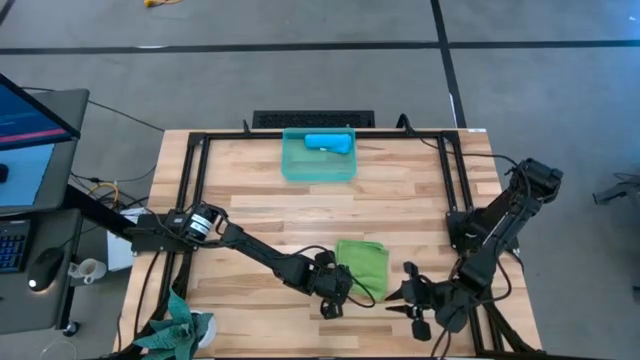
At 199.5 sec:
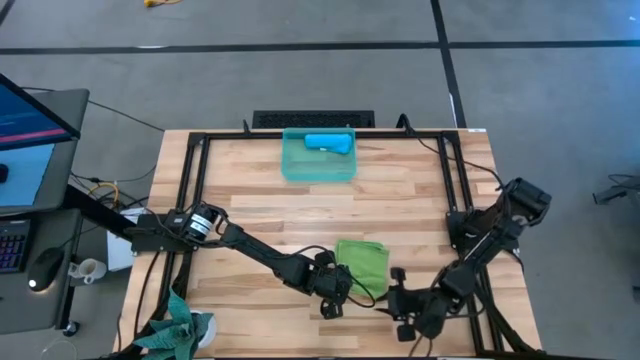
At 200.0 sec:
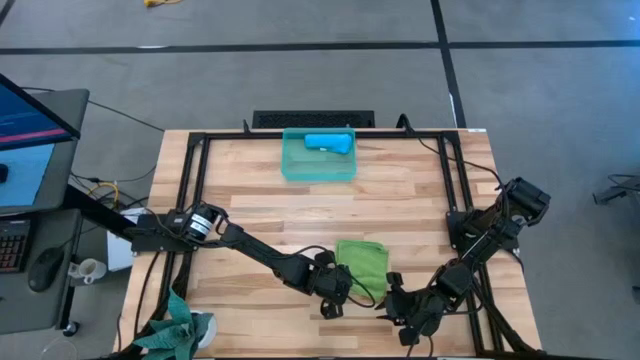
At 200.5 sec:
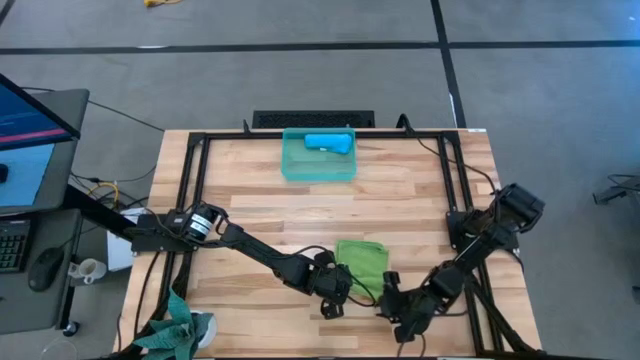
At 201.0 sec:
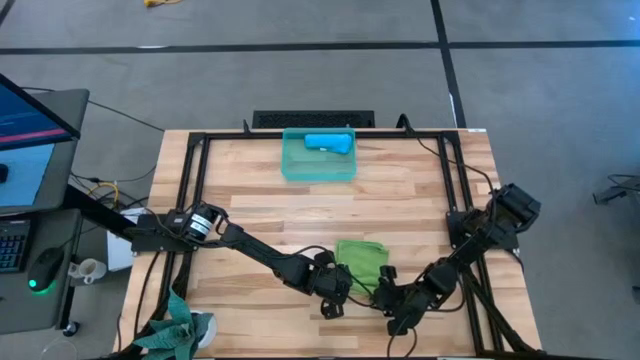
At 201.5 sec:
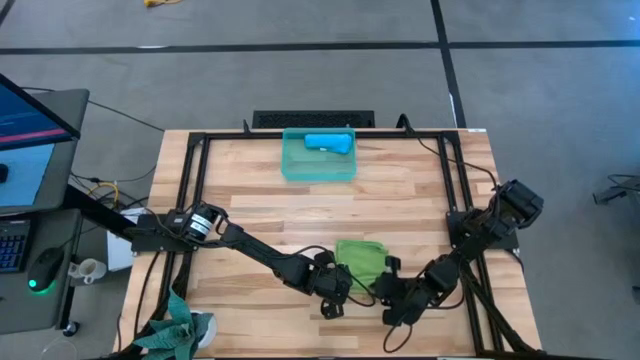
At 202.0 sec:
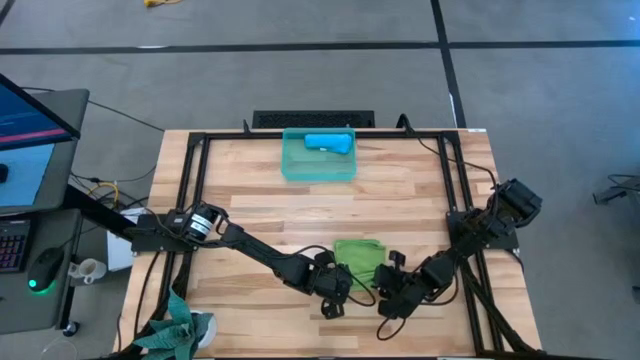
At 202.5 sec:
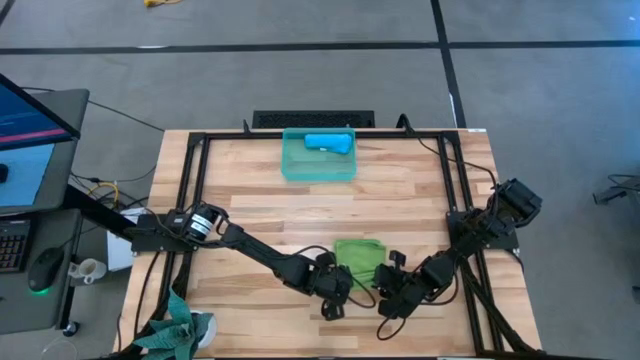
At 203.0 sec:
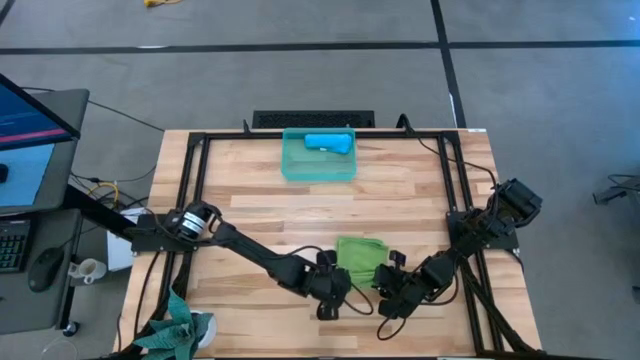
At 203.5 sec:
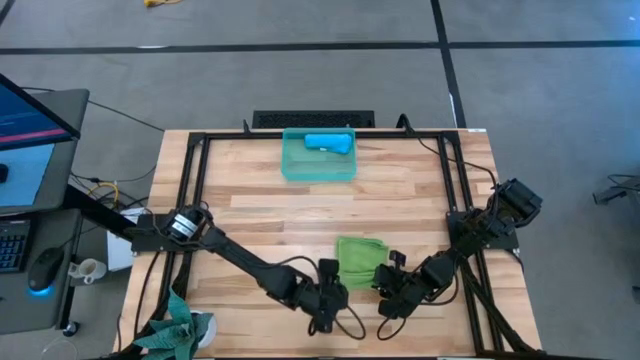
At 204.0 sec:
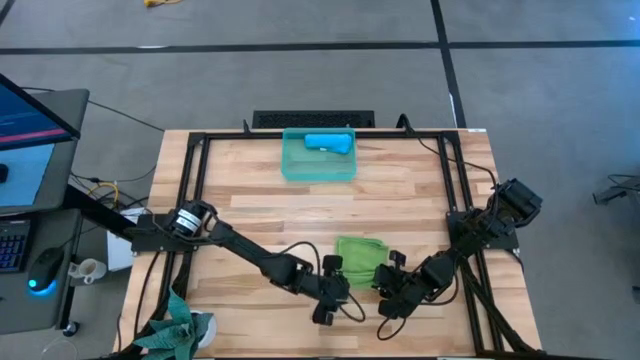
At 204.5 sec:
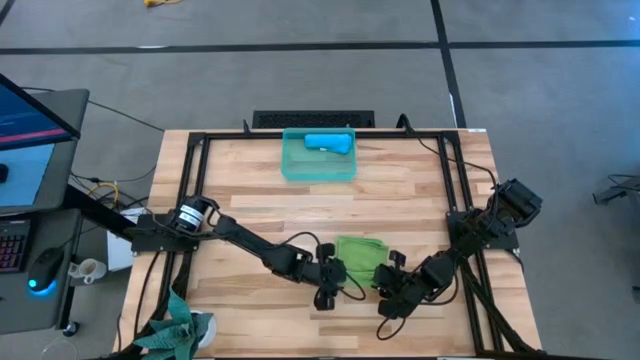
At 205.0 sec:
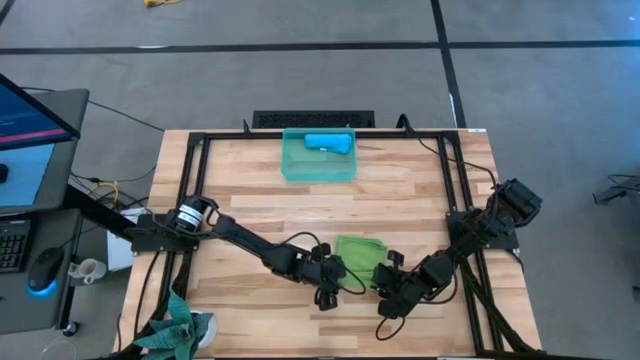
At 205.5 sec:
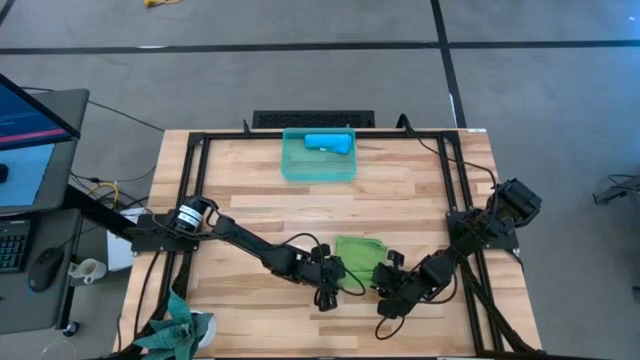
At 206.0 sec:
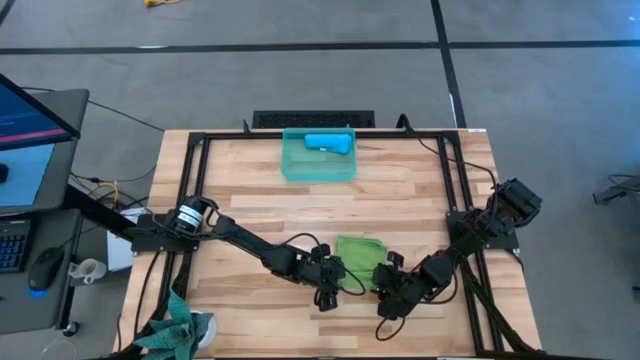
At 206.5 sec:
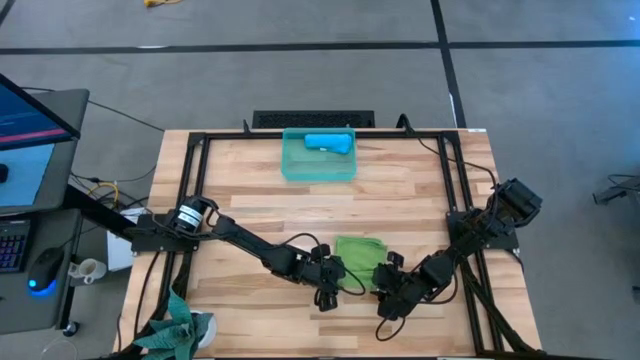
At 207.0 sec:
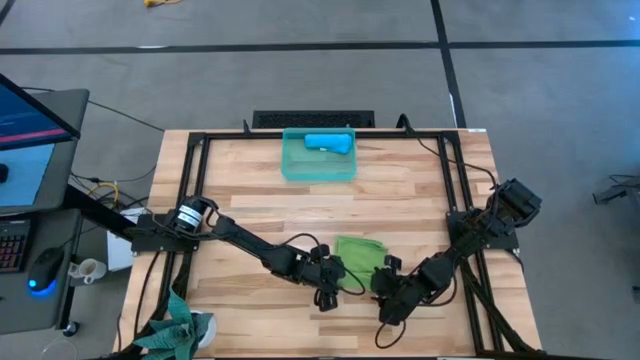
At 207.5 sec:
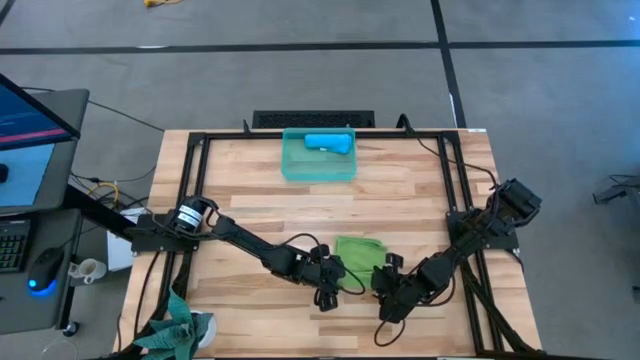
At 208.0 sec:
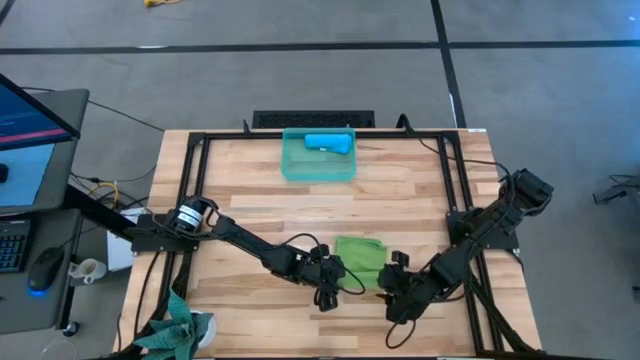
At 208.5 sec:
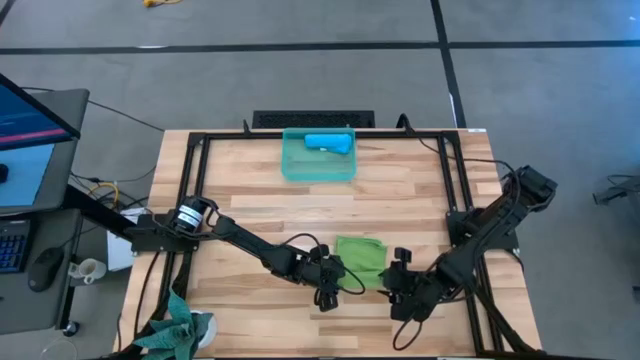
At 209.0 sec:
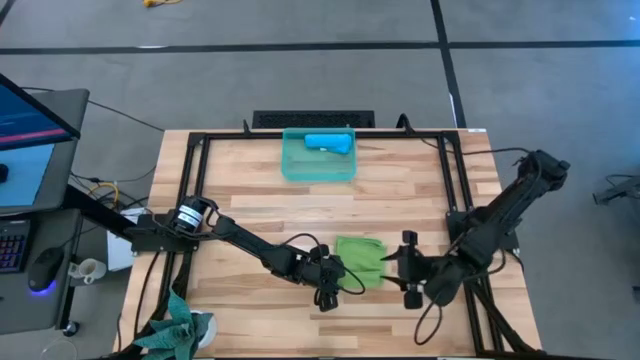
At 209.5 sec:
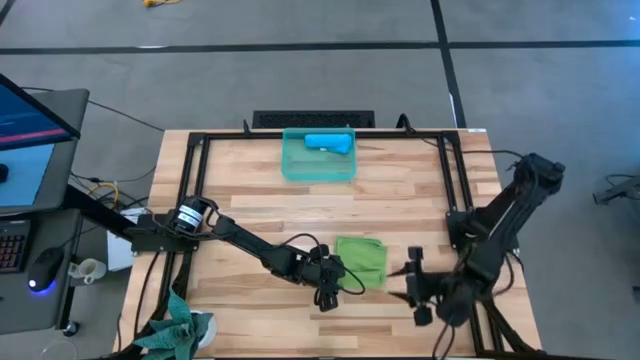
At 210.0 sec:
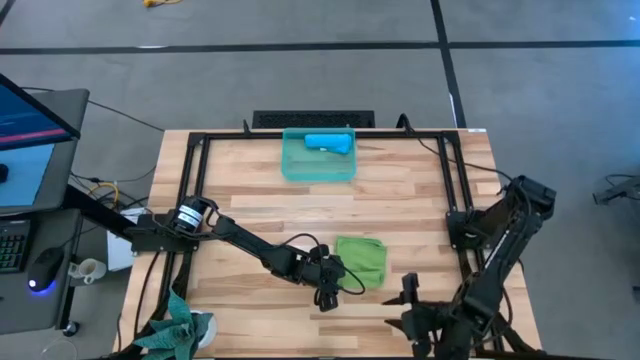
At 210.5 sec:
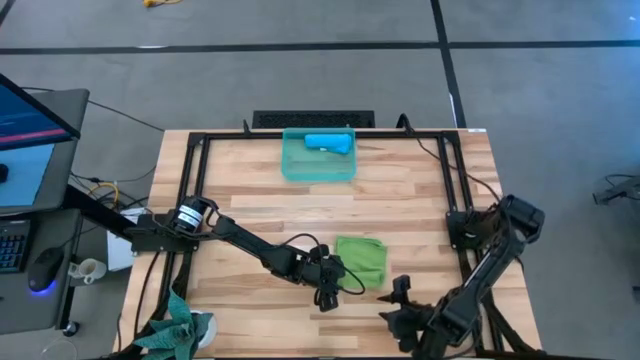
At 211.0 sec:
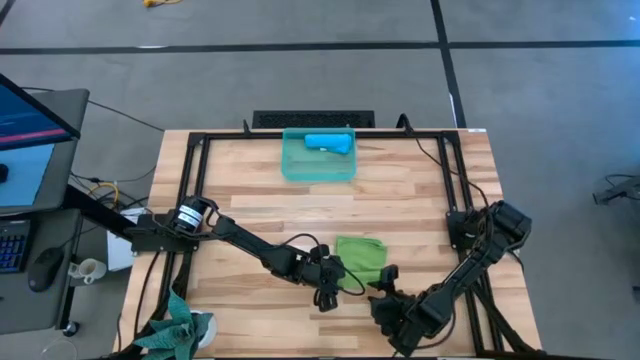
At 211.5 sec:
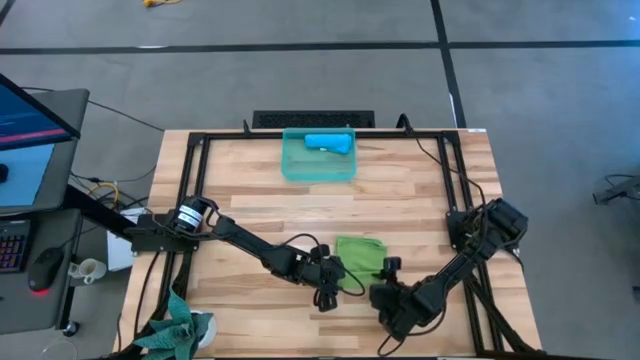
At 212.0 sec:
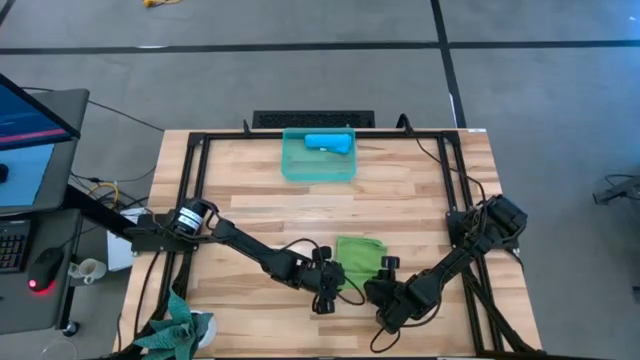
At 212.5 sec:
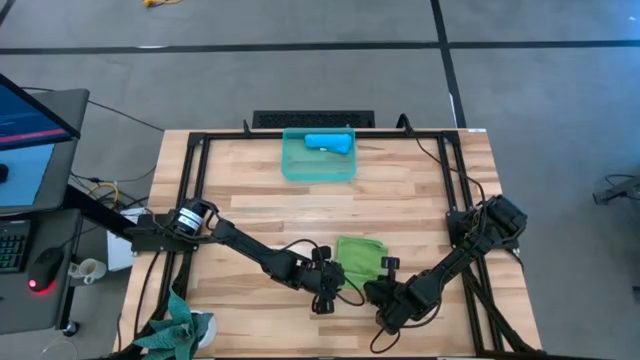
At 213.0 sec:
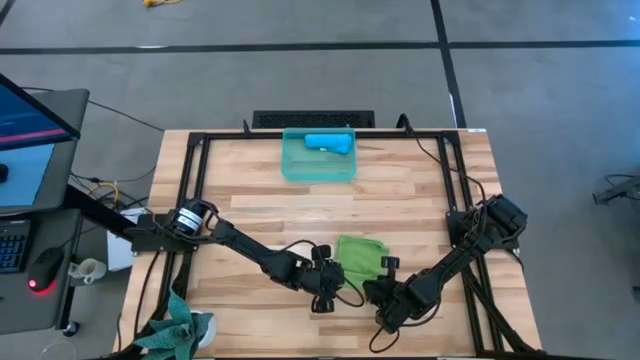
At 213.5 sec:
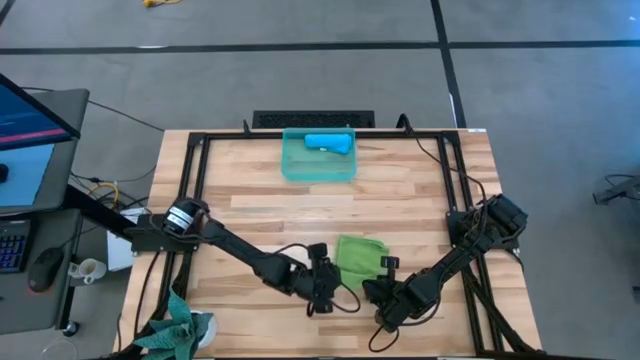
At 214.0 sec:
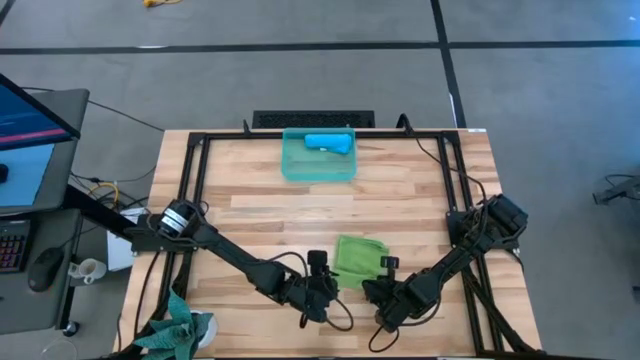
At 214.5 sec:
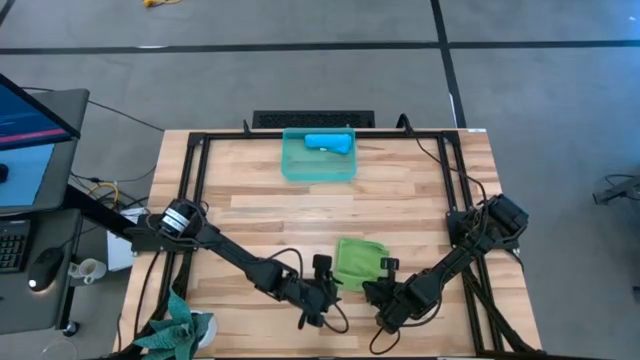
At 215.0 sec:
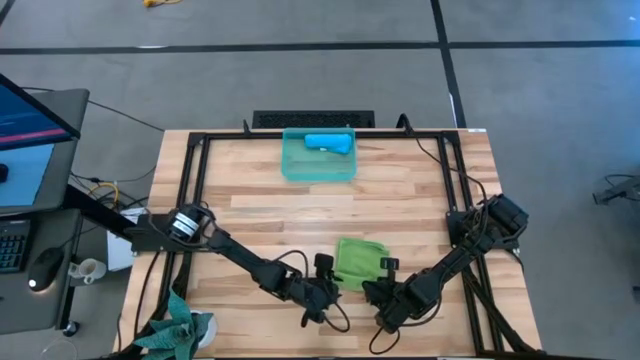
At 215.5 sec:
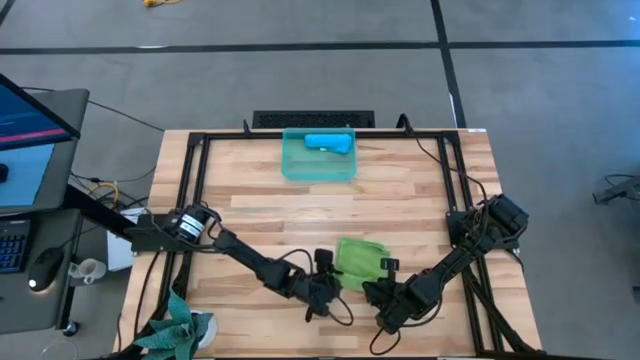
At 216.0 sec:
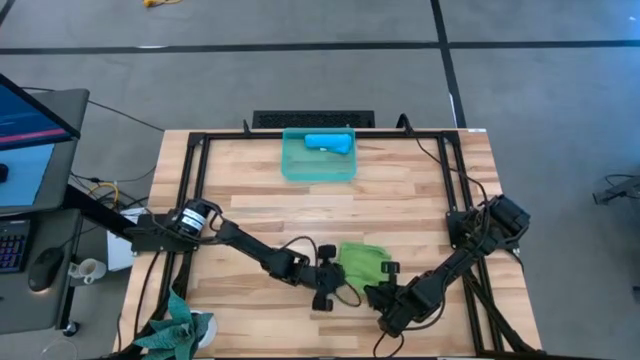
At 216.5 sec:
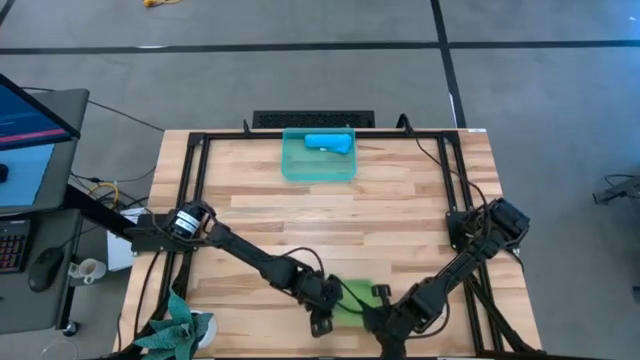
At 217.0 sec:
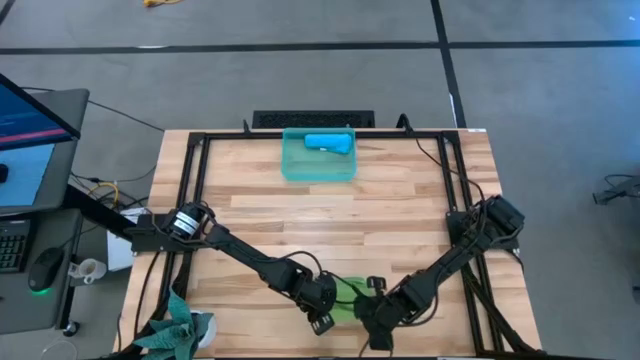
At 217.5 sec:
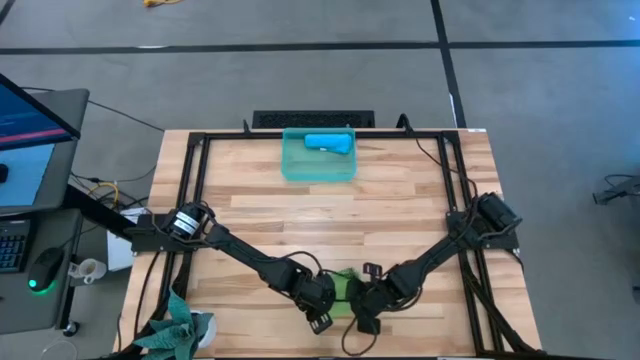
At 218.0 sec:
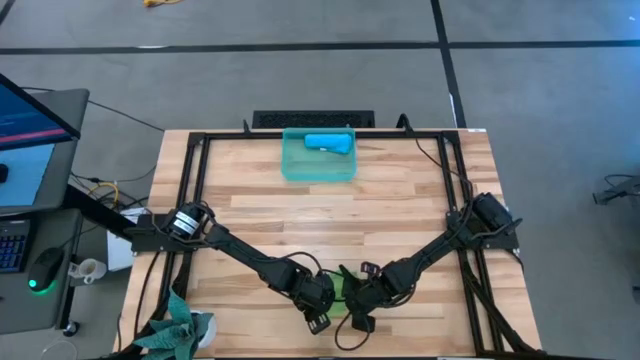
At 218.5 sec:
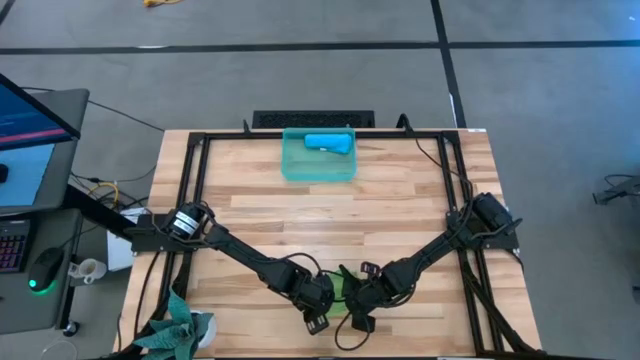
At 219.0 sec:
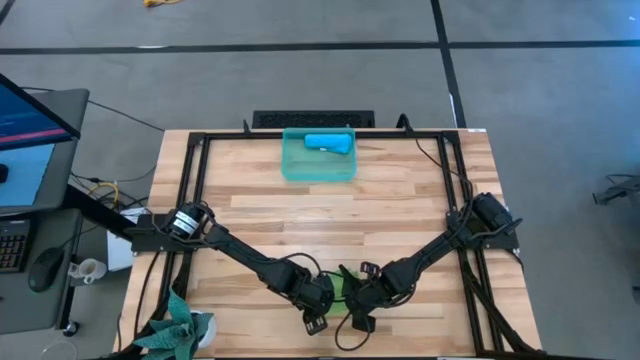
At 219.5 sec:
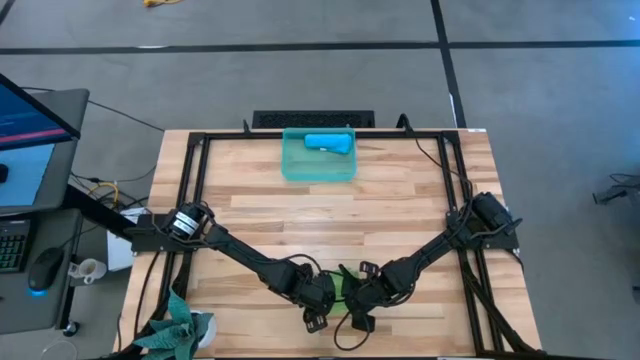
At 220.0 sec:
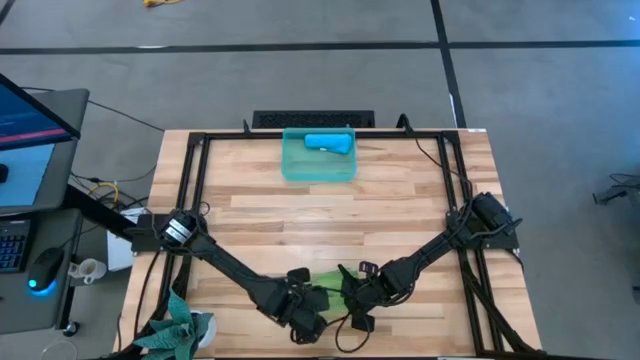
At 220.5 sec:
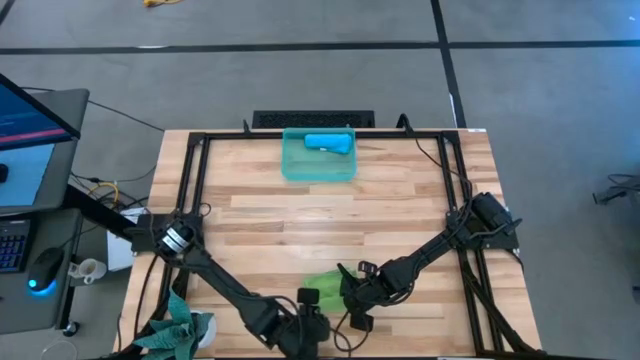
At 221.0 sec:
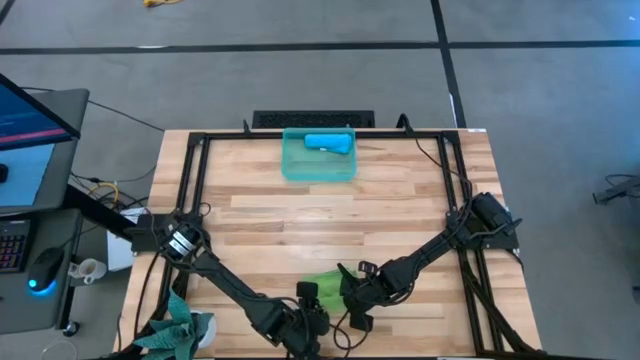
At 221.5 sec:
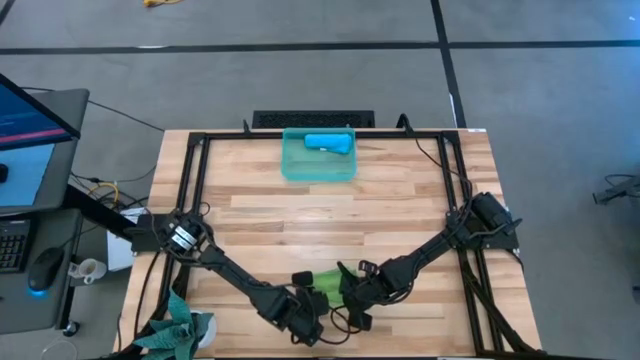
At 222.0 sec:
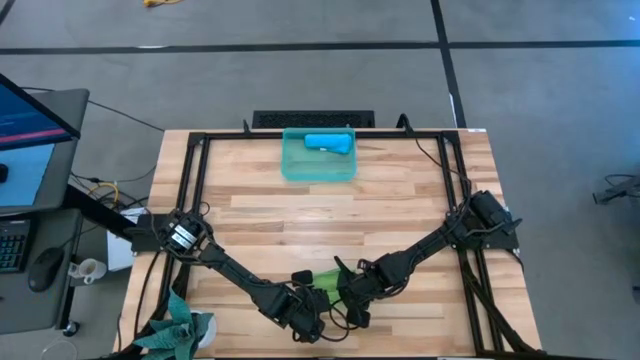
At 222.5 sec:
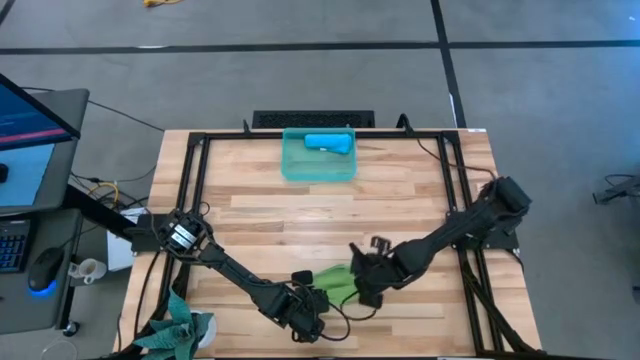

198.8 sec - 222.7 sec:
Task: Roll microfiber towels into tight, uniform cylinder then place into a basket
Roll the green microfiber cloth
